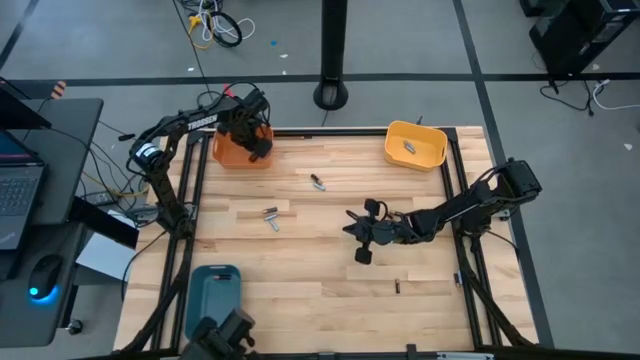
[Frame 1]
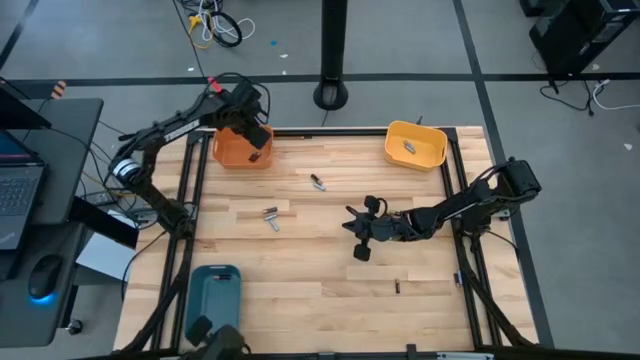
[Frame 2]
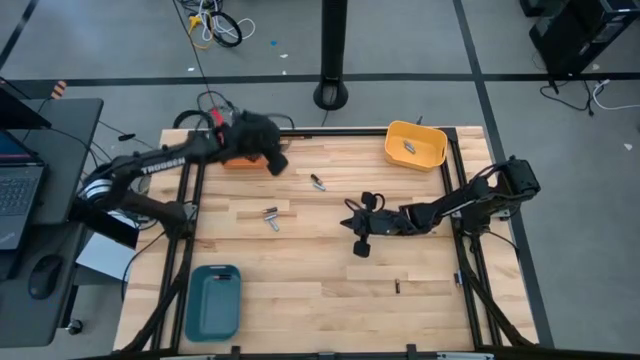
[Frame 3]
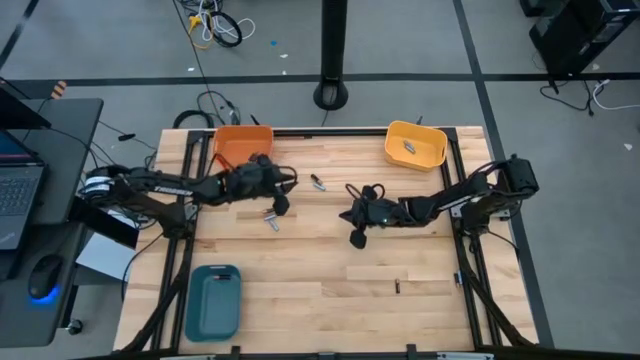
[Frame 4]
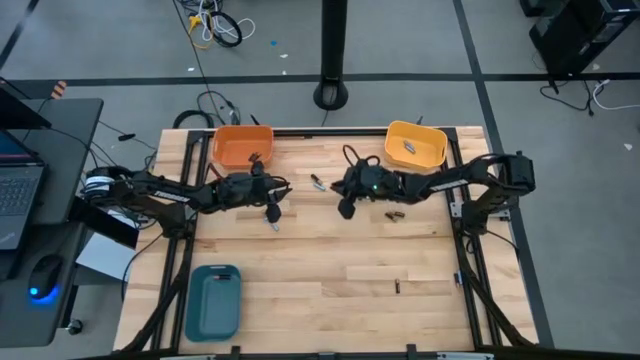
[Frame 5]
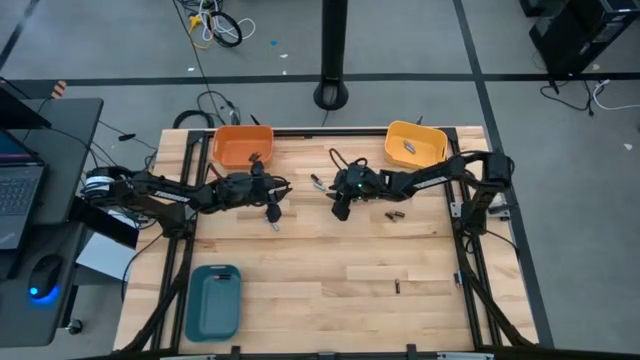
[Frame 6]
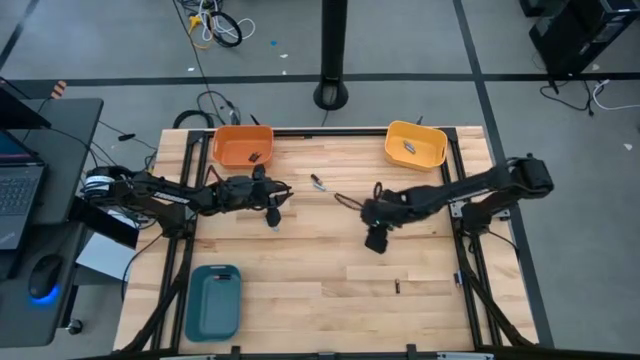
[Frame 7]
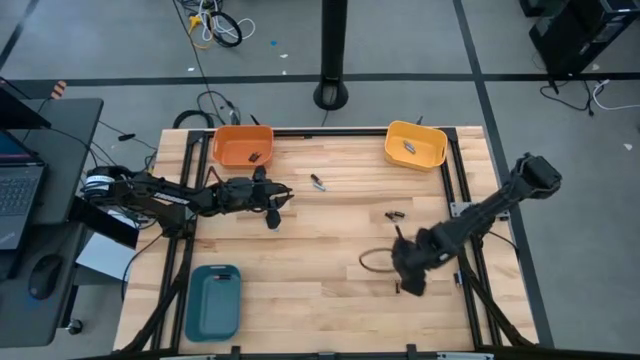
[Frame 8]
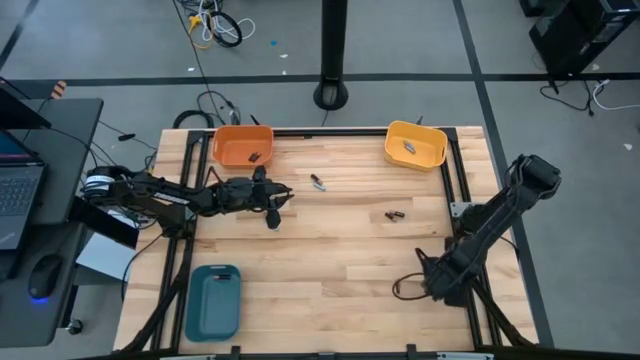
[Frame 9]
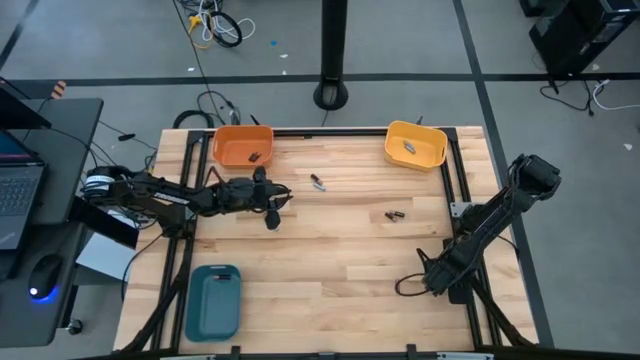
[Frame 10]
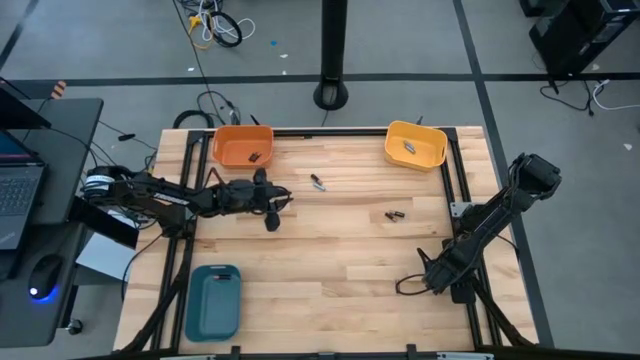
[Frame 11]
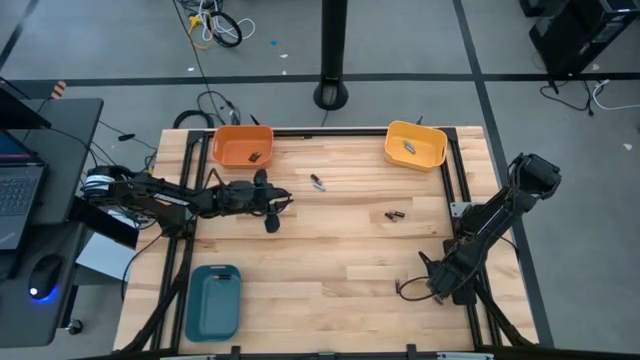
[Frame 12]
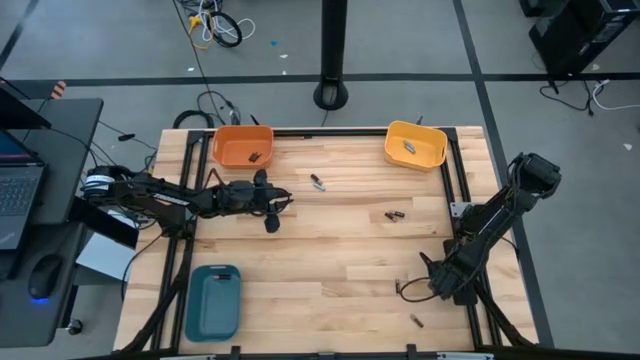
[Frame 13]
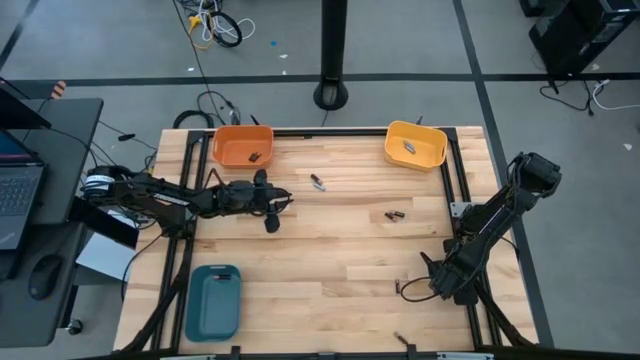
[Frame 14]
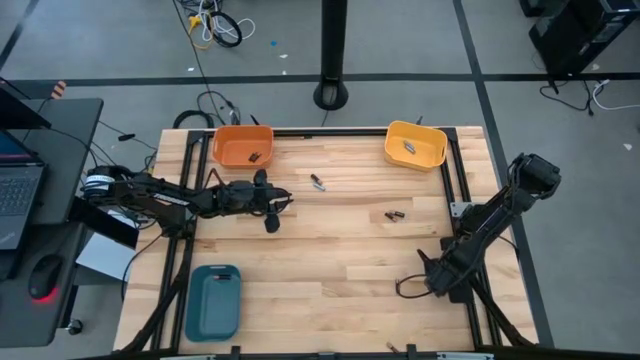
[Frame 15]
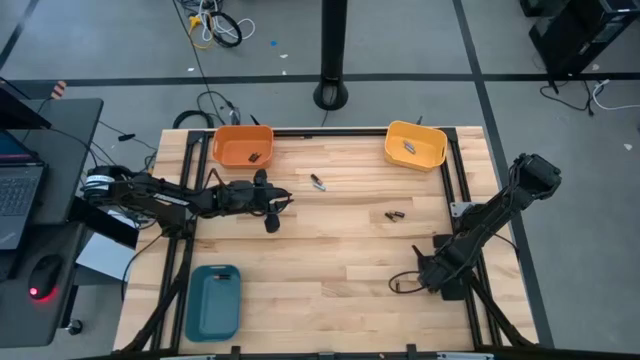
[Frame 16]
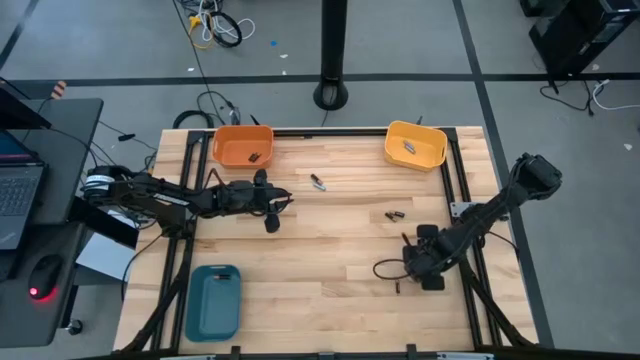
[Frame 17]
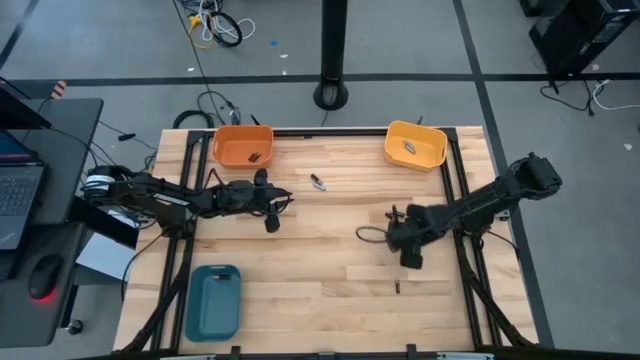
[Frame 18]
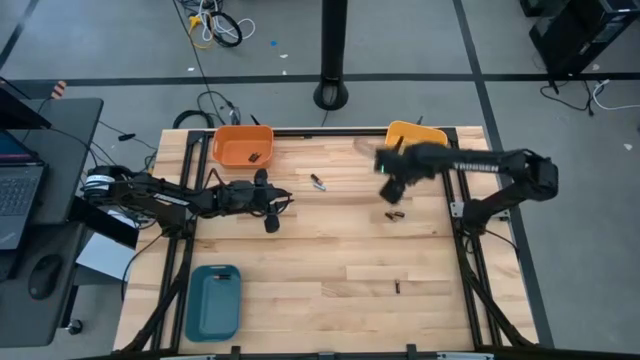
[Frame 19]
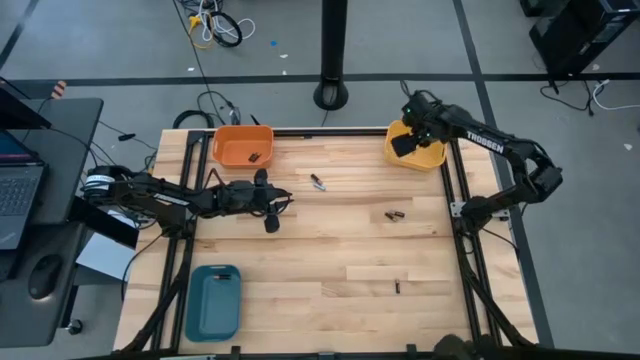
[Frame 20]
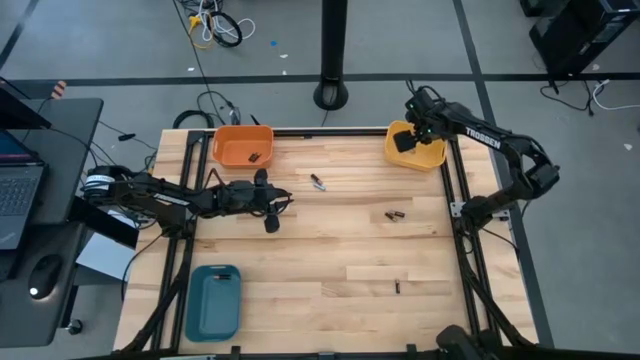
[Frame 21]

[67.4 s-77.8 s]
Task: Sort batteries
Put the small gray battery into the yellow bin

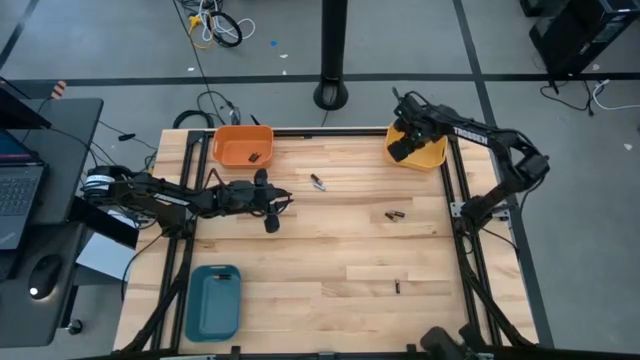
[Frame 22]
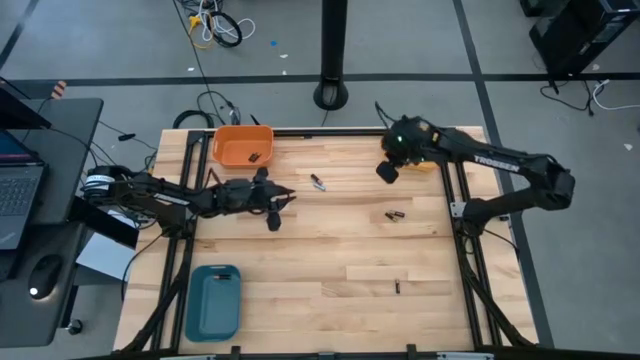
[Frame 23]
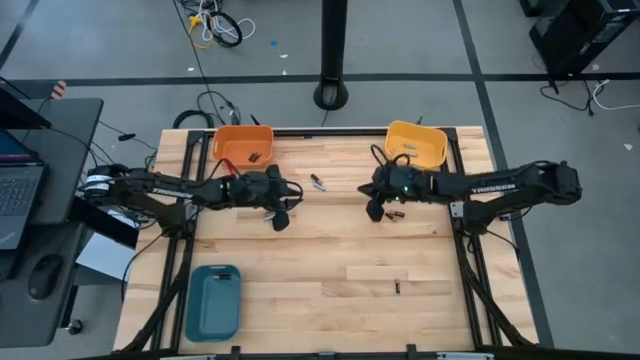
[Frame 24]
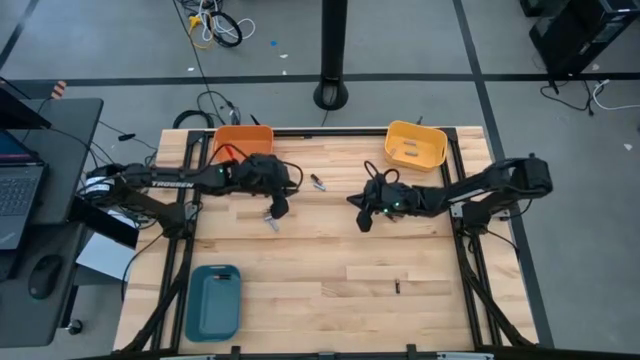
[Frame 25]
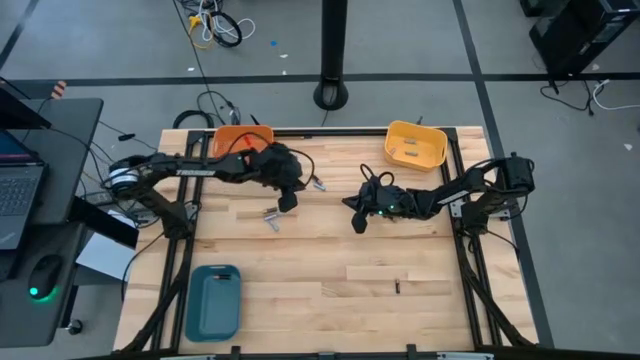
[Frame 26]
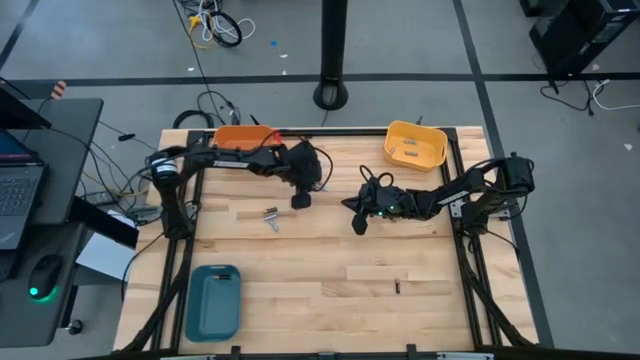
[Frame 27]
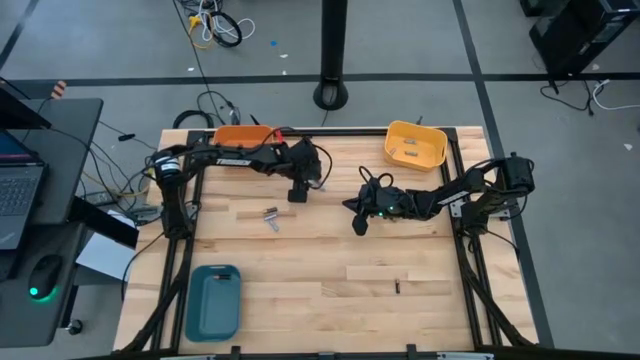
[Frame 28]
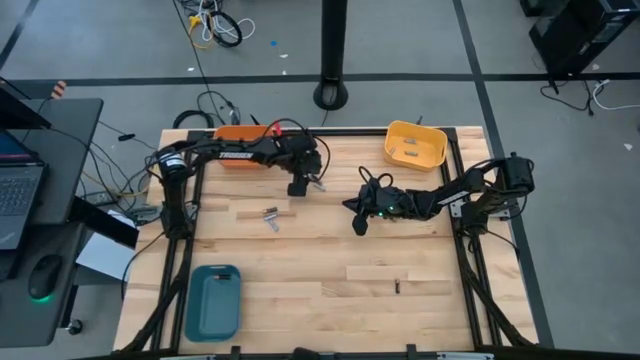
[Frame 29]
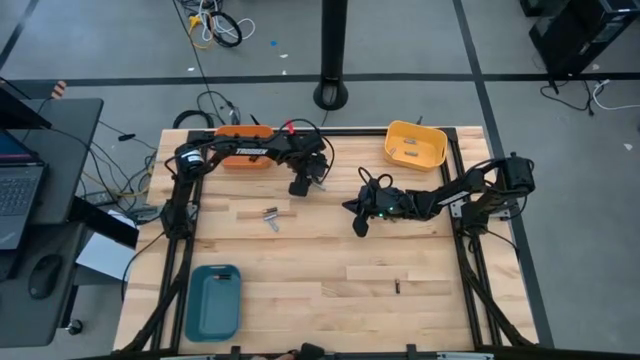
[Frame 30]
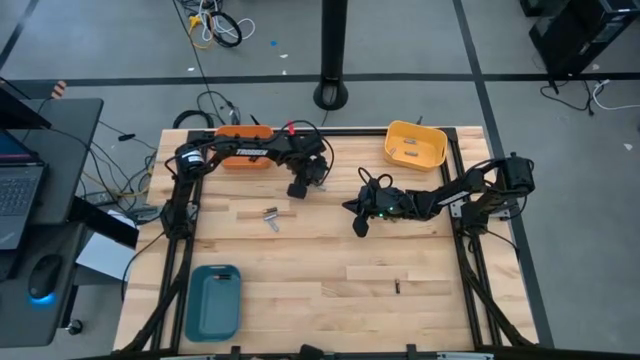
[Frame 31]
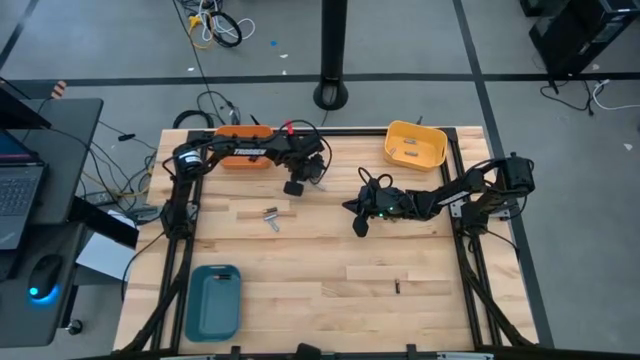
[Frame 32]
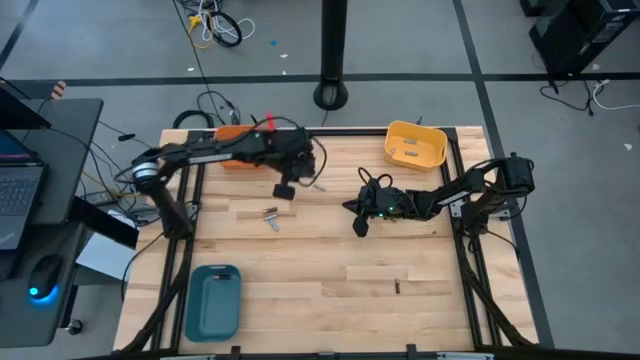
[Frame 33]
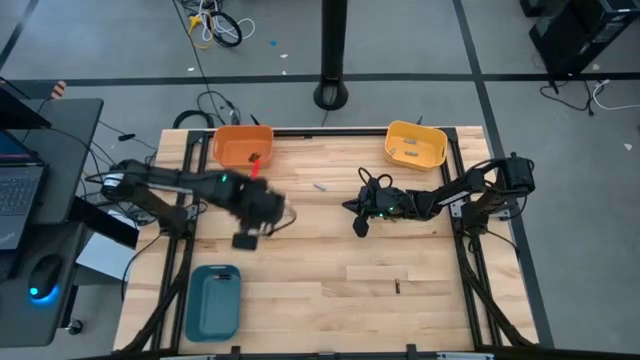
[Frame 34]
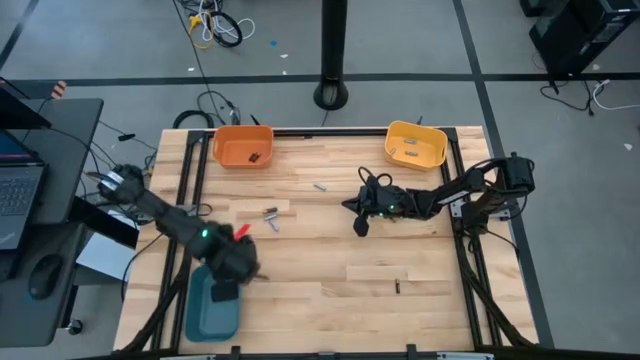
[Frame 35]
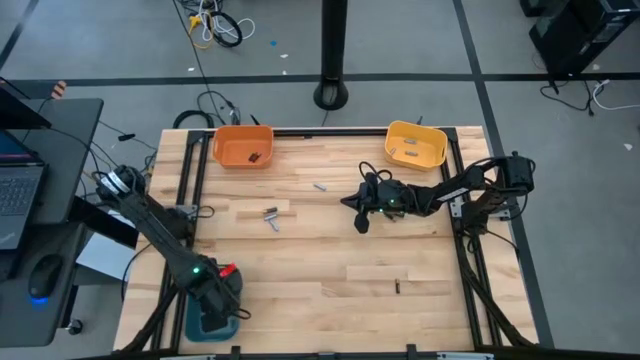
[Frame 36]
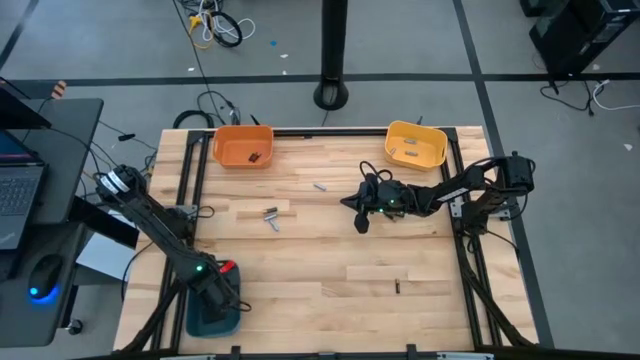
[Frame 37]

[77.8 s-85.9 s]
Put the big copper and black battery into the blue bin

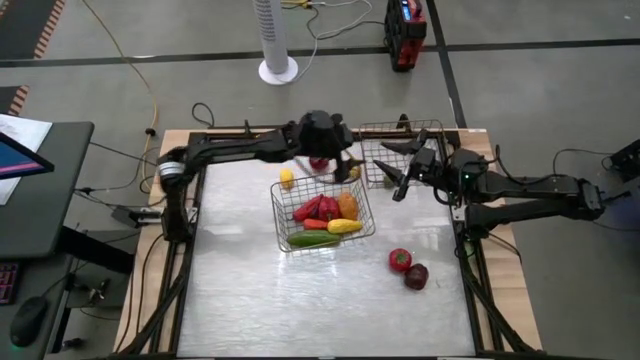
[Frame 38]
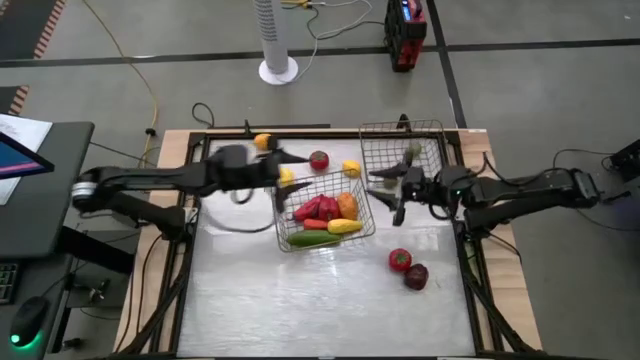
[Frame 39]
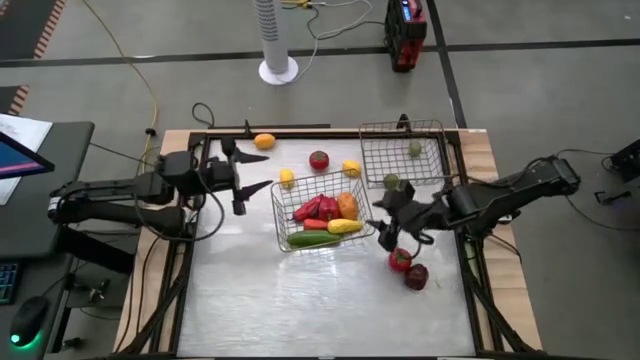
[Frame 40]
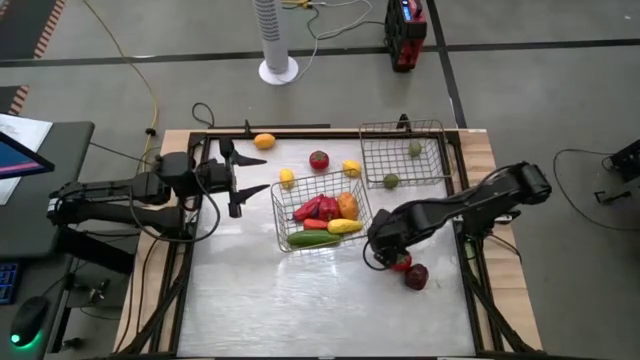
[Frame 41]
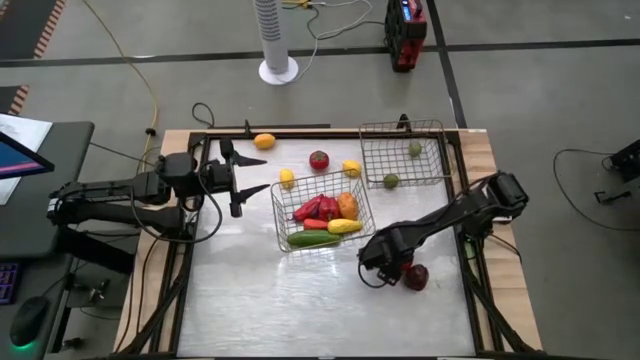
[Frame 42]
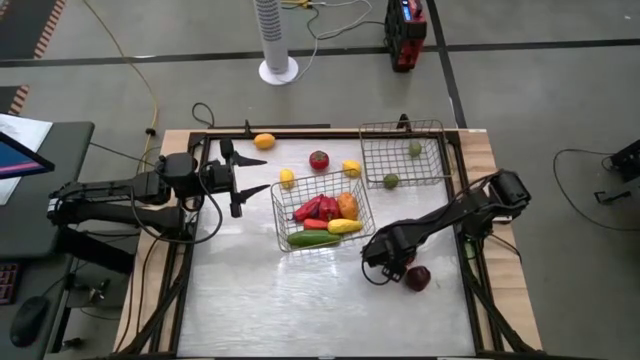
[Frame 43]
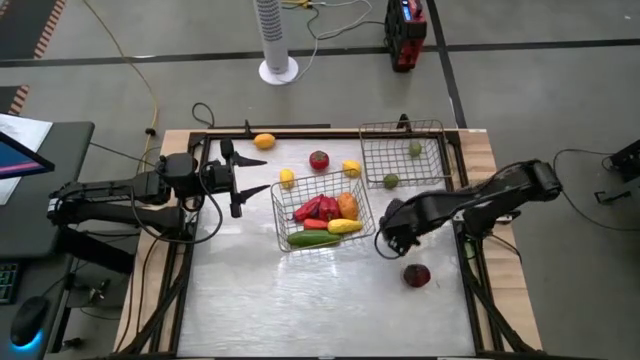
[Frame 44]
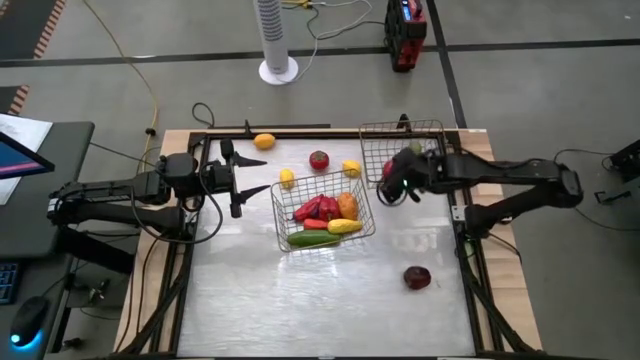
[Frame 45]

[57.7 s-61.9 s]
Task: Sort produce into baskets
Put the red tomato into the right wire basket
